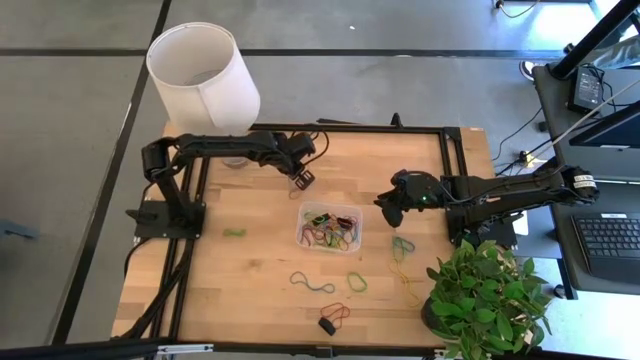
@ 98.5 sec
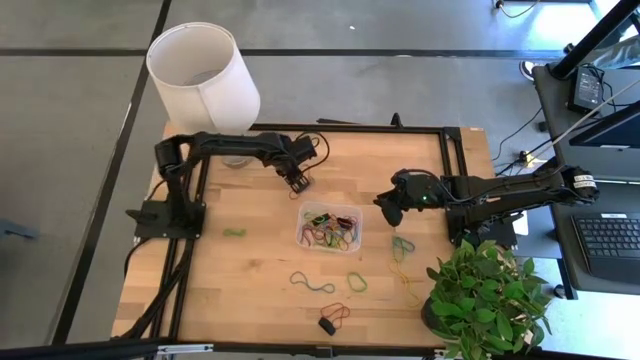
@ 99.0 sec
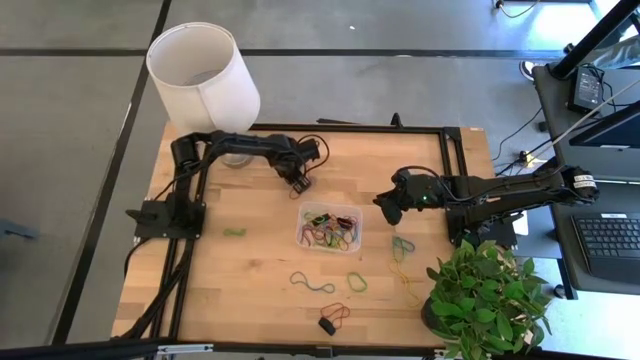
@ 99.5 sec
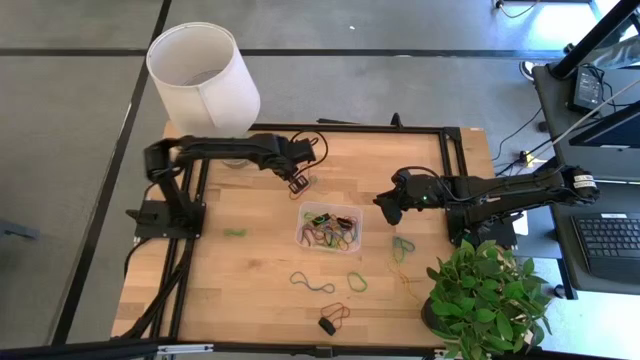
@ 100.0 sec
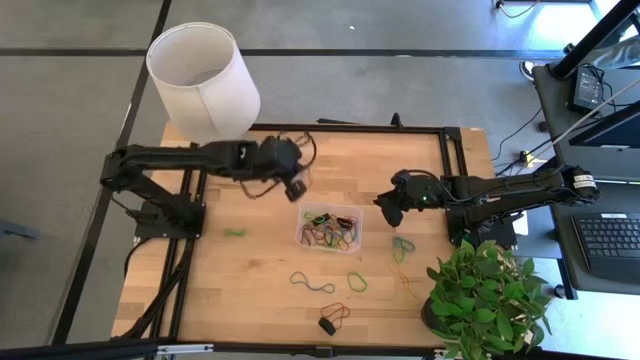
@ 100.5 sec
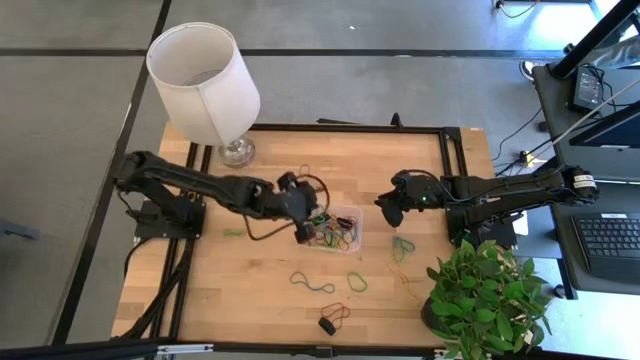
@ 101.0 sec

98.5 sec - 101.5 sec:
Task: Pick and place rubber bands into bin
Put the blue rubber band into the transparent bin

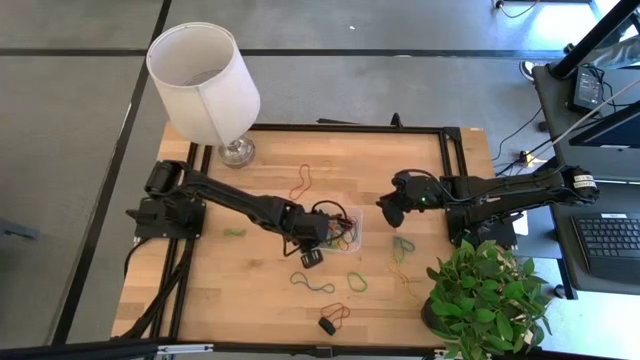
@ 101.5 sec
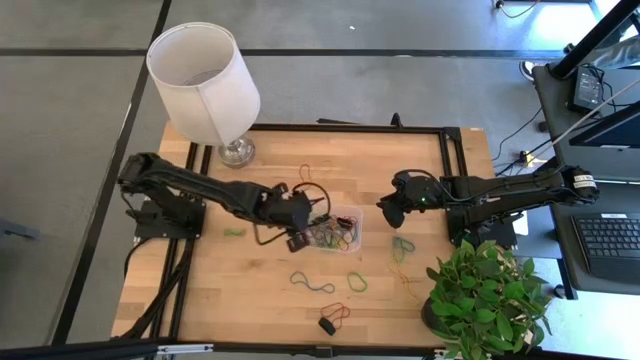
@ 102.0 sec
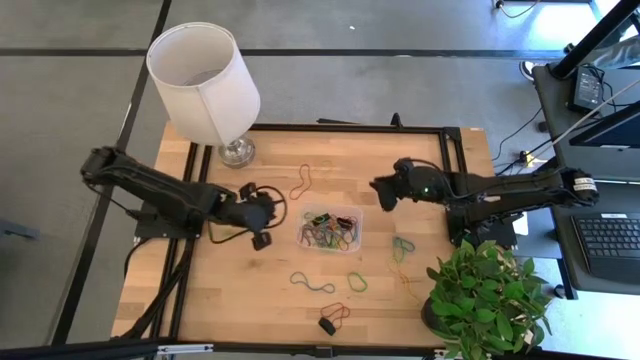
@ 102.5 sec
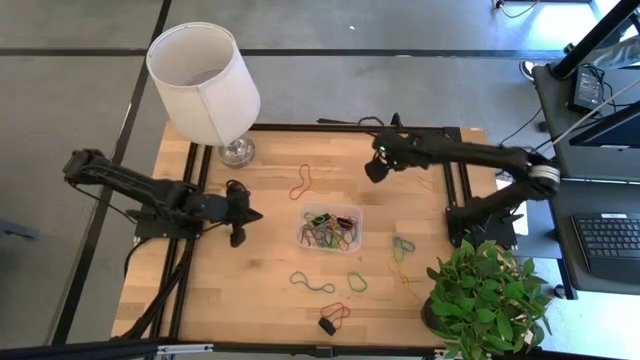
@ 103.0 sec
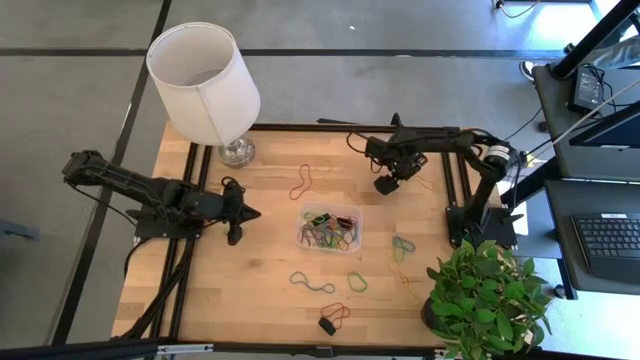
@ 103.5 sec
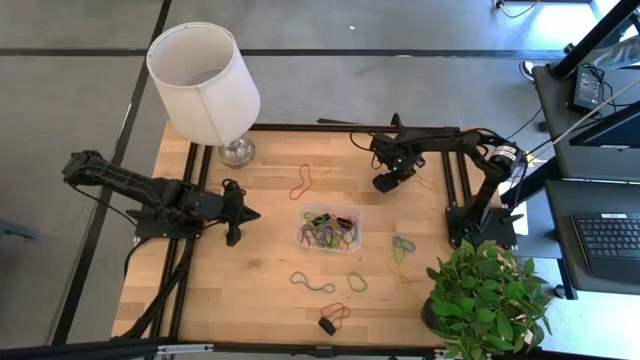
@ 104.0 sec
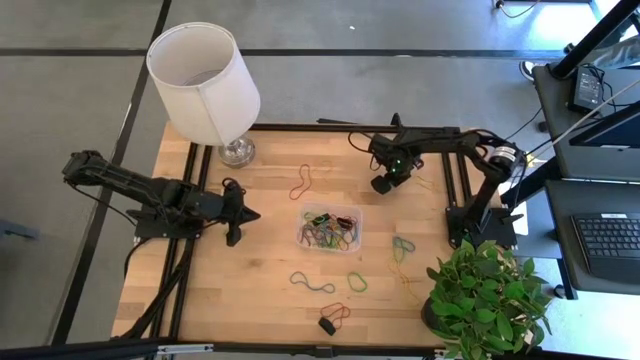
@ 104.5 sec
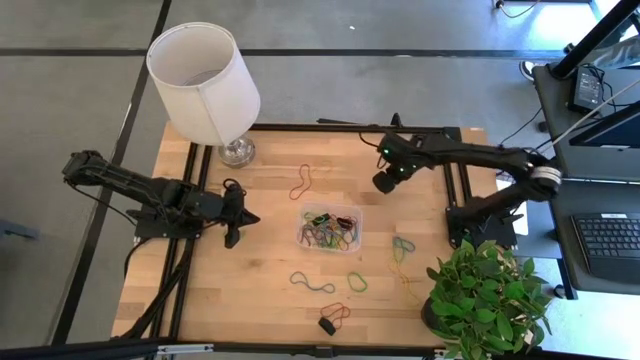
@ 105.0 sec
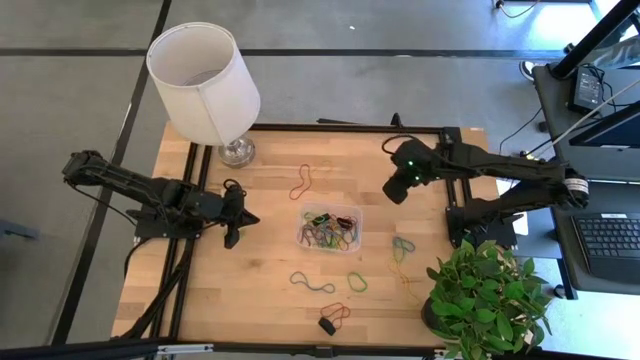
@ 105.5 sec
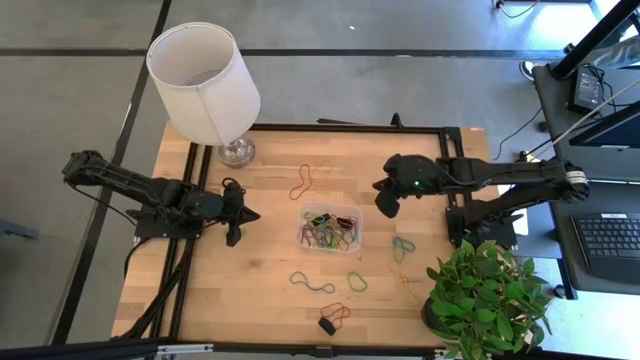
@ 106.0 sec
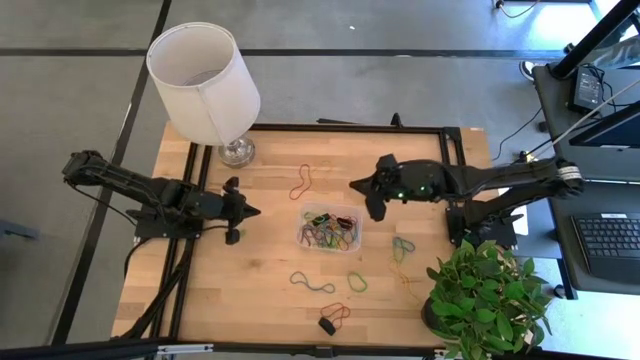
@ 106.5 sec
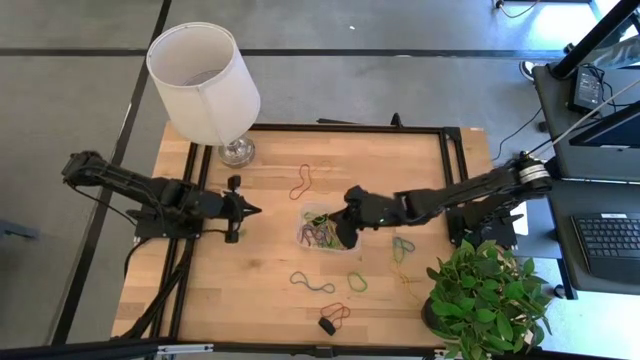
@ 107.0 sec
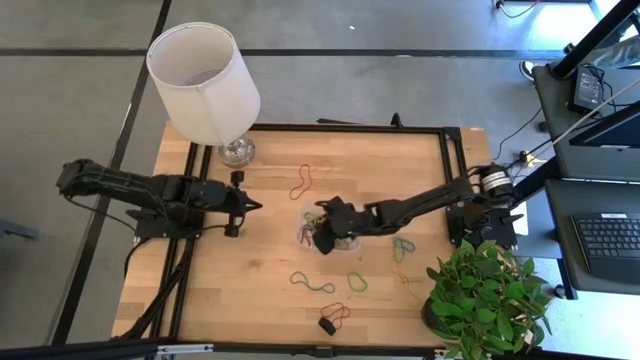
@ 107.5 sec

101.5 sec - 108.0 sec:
Put the yellow rubber band into the transparent bin

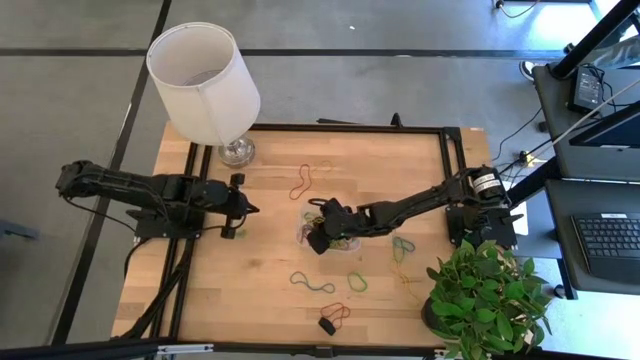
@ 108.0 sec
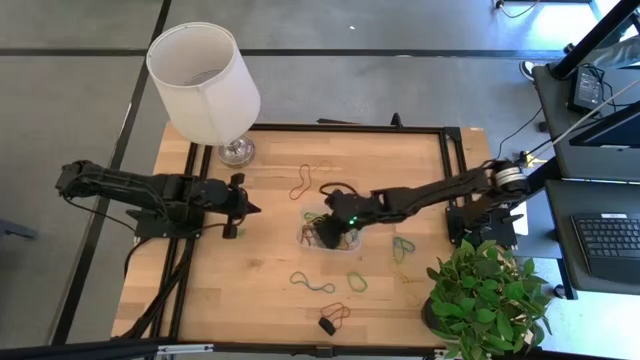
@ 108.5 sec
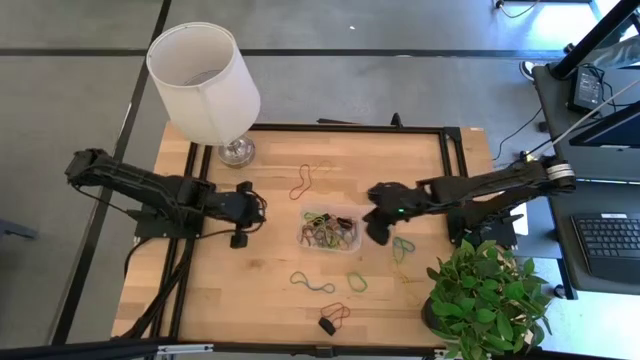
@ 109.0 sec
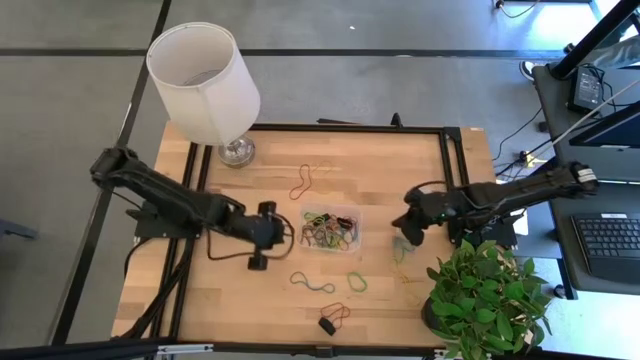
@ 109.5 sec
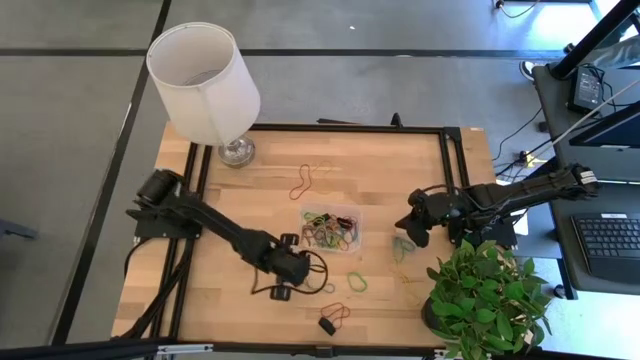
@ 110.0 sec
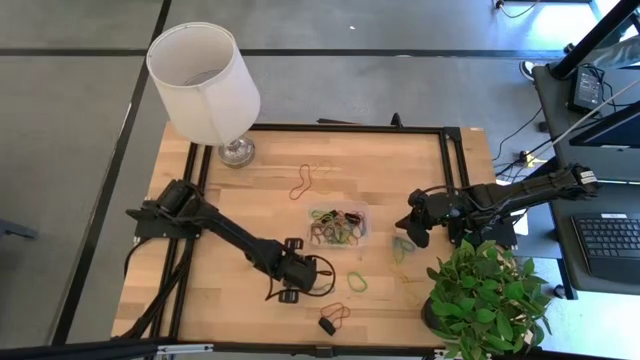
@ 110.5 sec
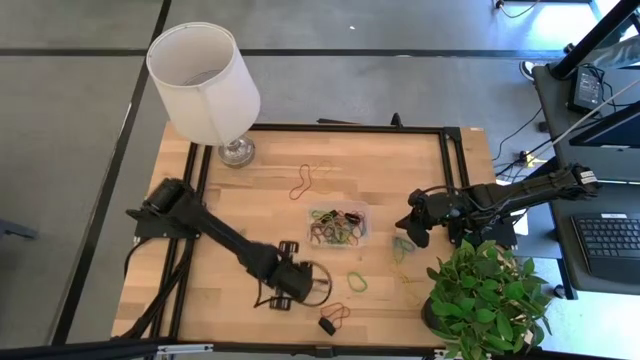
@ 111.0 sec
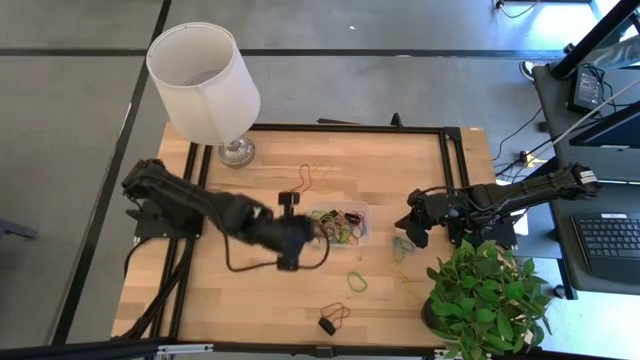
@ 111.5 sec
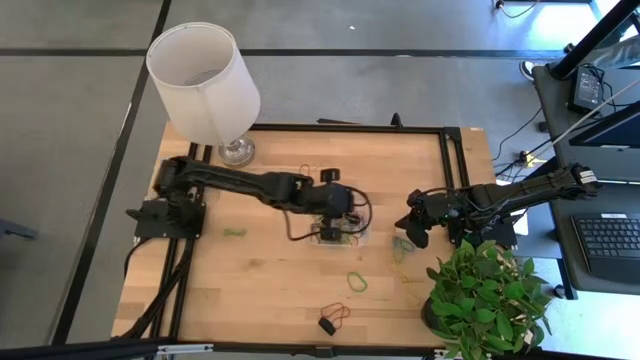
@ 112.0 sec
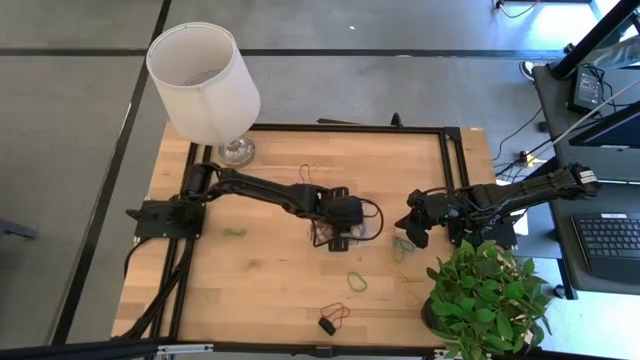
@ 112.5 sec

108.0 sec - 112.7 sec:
Put the blue rubber band into the transparent bin

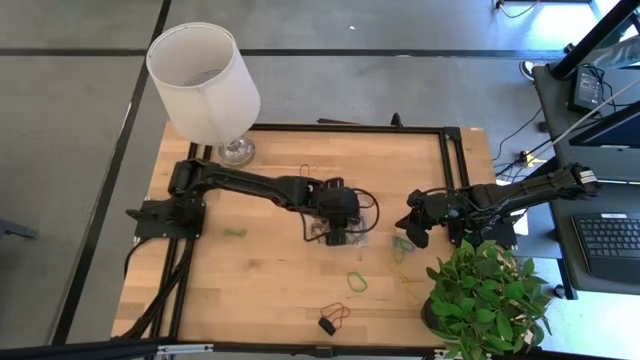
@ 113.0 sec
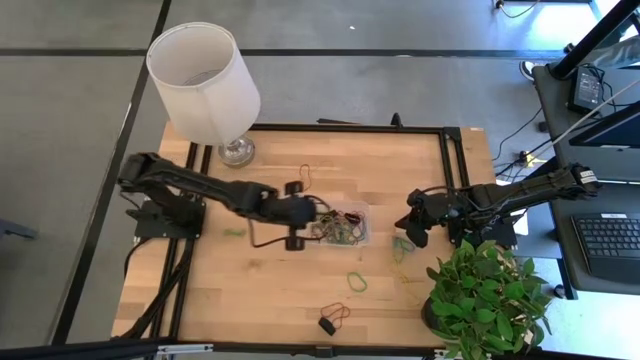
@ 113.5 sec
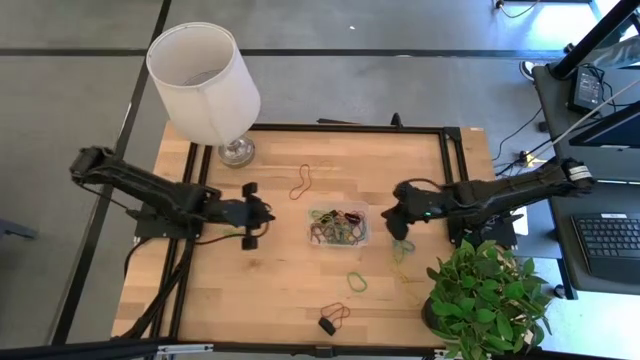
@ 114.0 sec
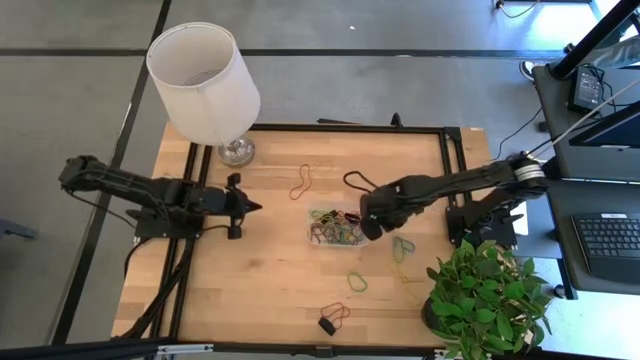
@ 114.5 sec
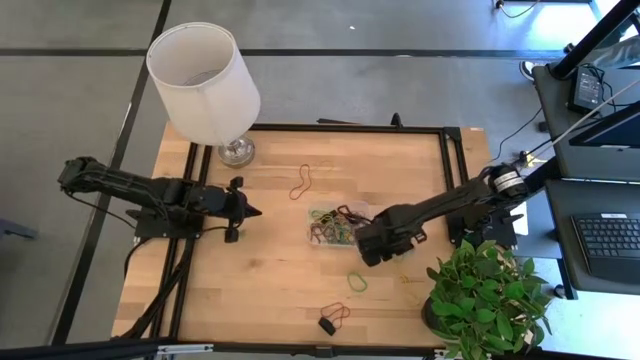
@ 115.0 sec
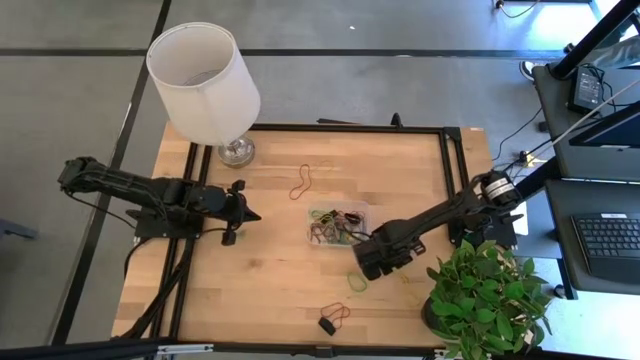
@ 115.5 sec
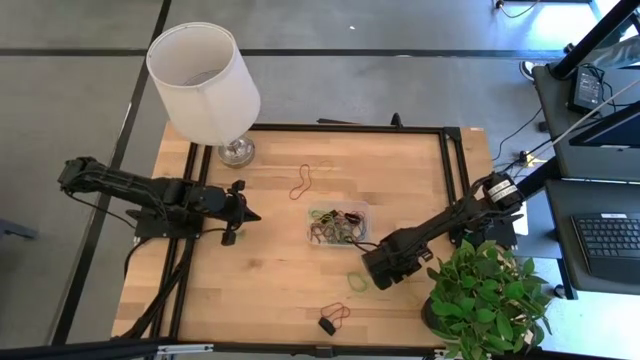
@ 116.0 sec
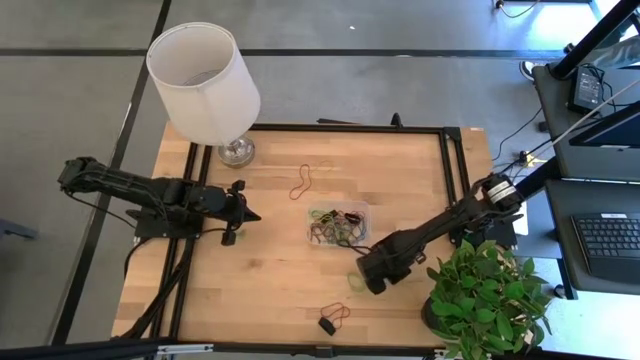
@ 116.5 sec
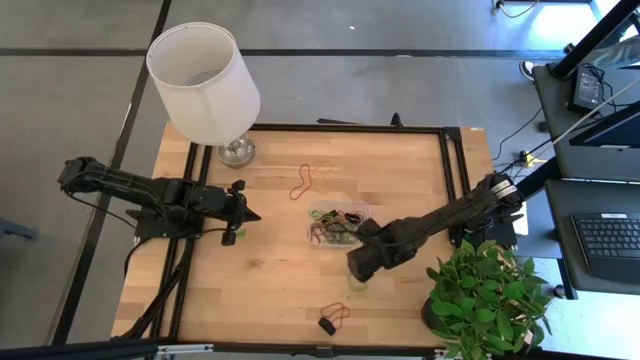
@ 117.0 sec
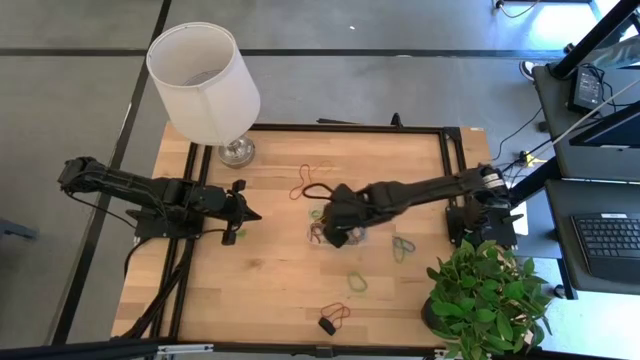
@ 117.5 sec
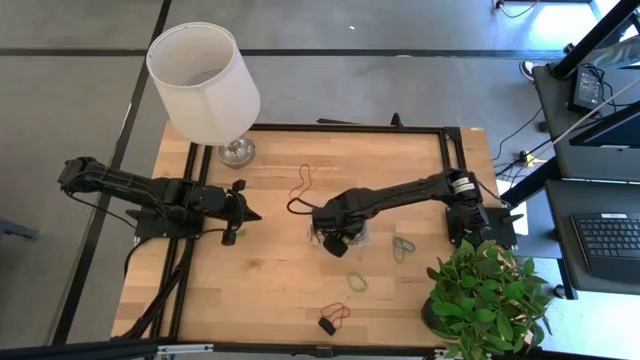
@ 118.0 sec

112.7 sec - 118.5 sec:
Put the yellow rubber band into the transparent bin

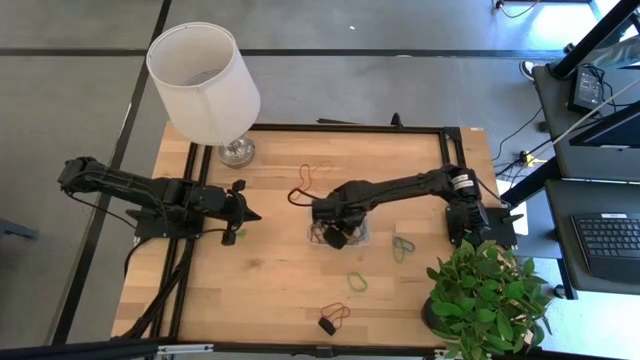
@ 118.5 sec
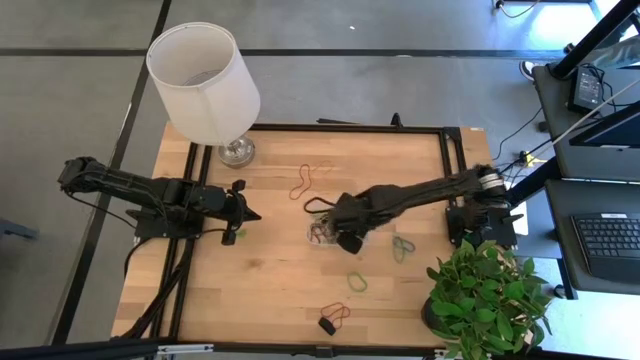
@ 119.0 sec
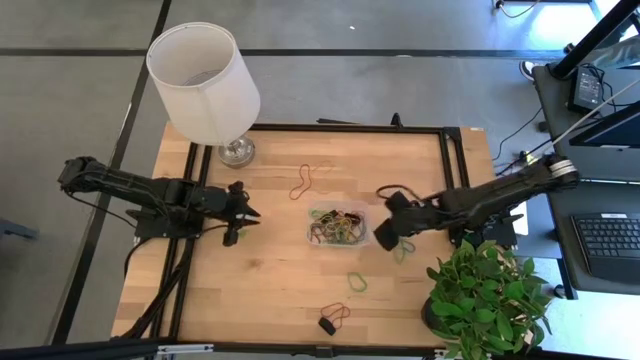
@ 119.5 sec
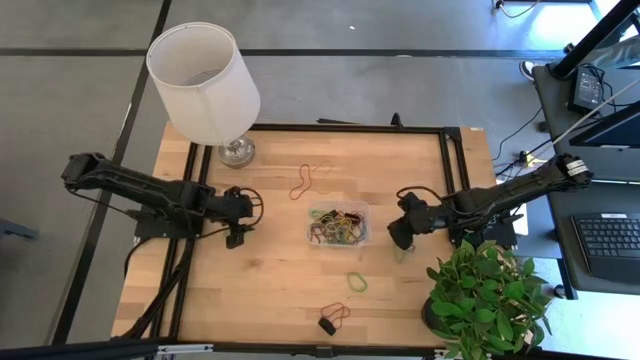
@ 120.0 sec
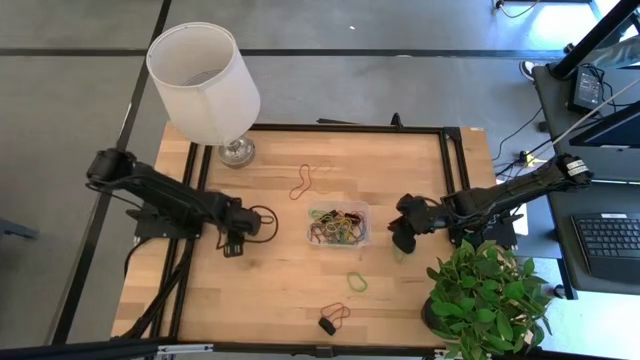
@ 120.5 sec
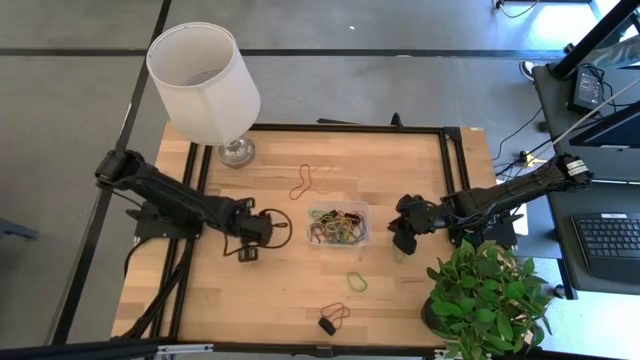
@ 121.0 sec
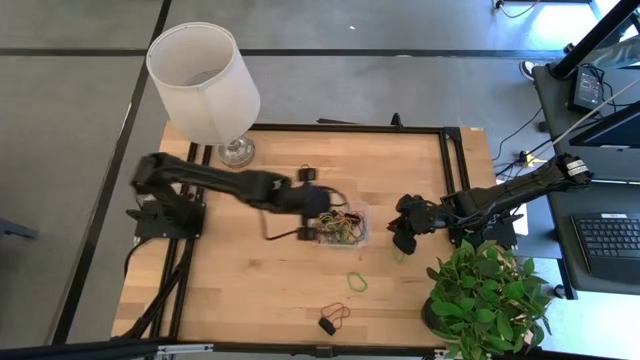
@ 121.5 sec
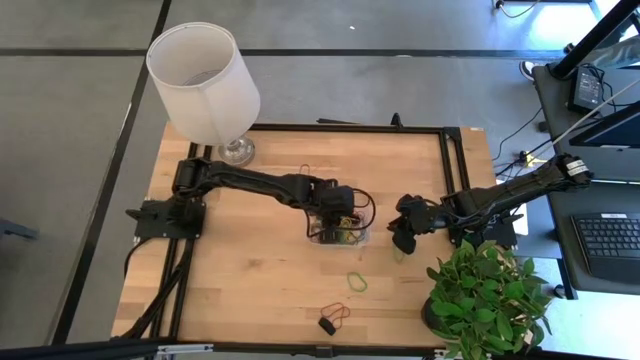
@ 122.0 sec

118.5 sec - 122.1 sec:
Put the green rubber band into the transparent bin
